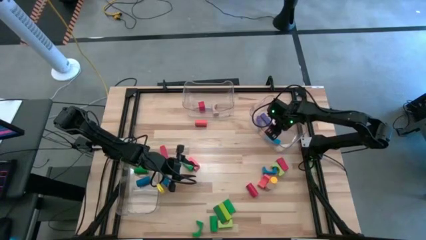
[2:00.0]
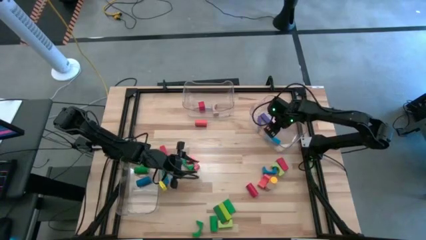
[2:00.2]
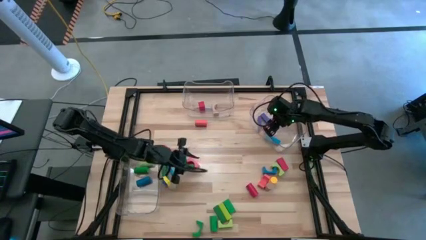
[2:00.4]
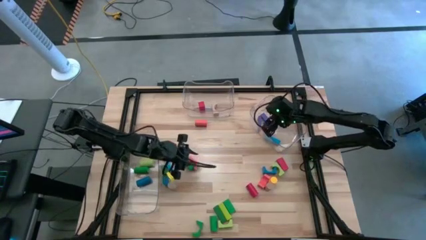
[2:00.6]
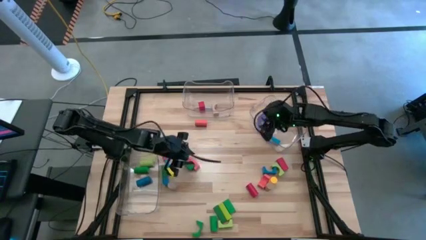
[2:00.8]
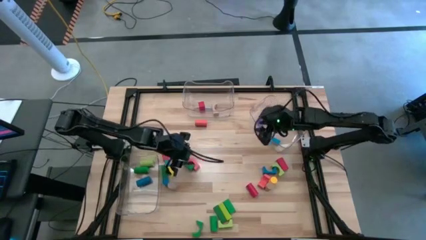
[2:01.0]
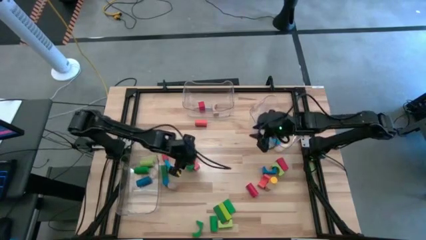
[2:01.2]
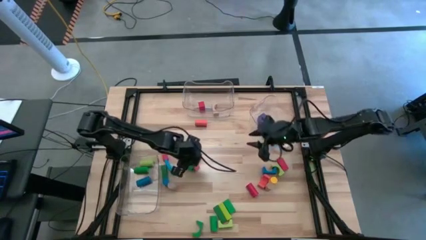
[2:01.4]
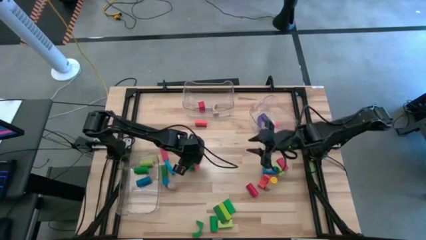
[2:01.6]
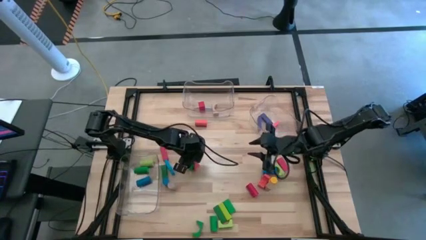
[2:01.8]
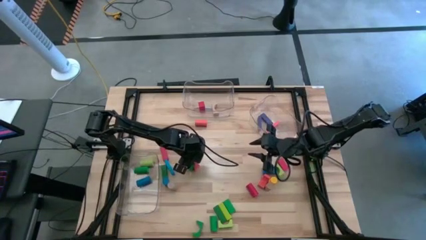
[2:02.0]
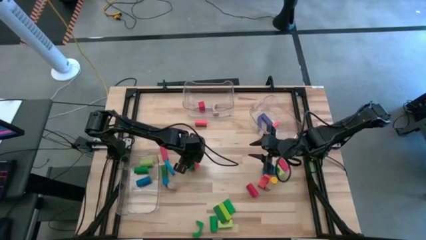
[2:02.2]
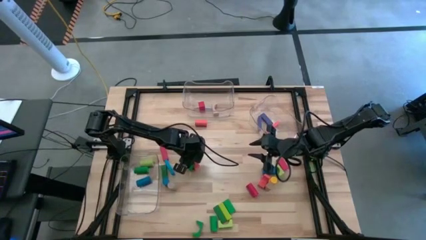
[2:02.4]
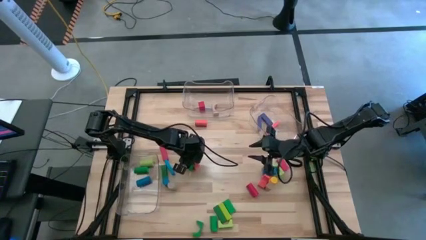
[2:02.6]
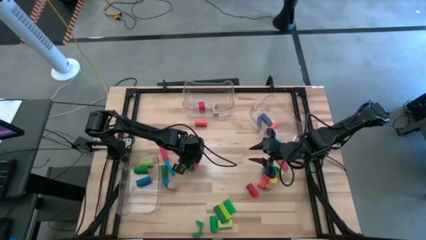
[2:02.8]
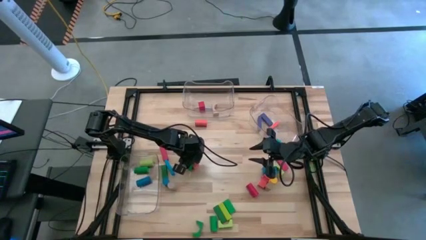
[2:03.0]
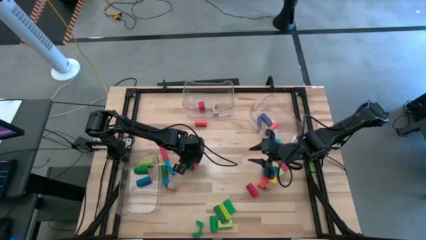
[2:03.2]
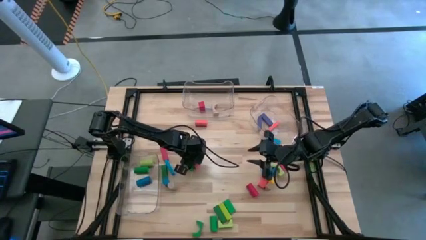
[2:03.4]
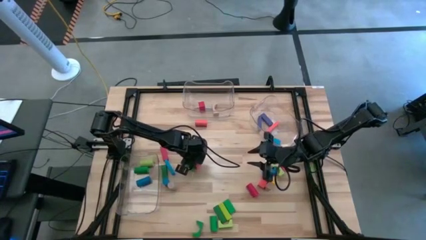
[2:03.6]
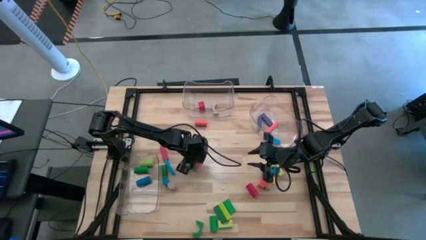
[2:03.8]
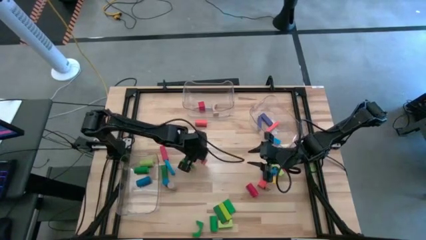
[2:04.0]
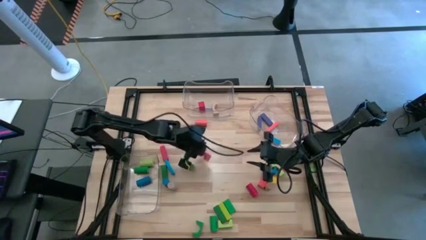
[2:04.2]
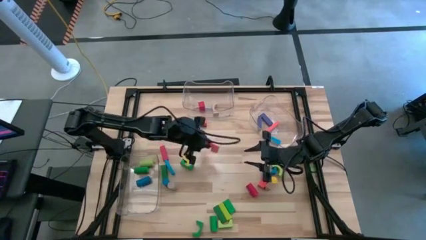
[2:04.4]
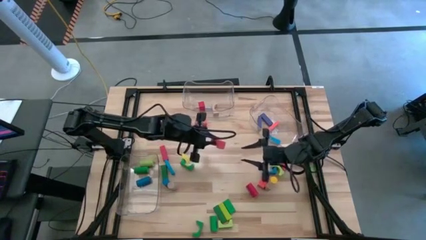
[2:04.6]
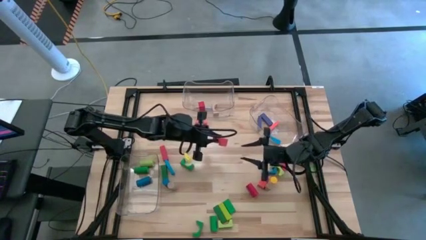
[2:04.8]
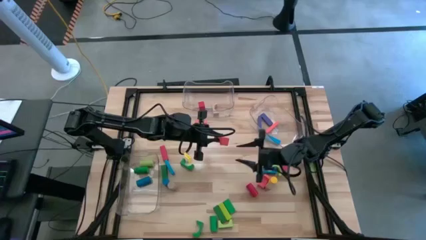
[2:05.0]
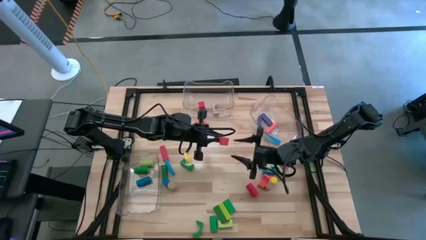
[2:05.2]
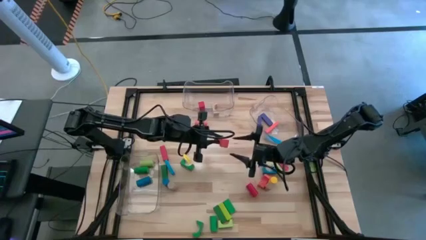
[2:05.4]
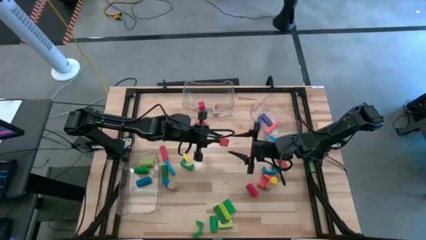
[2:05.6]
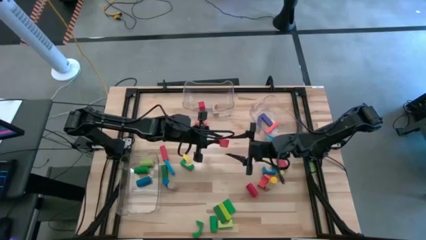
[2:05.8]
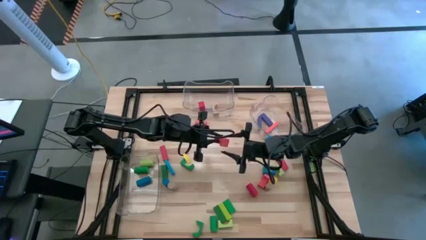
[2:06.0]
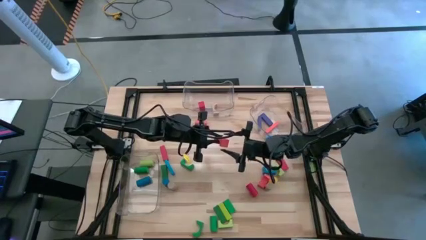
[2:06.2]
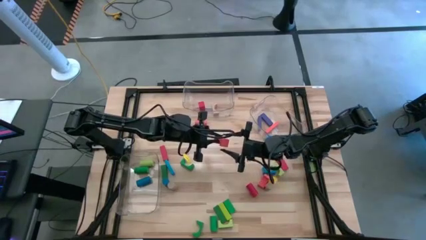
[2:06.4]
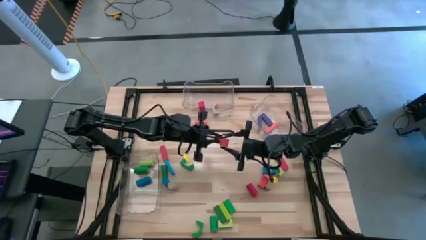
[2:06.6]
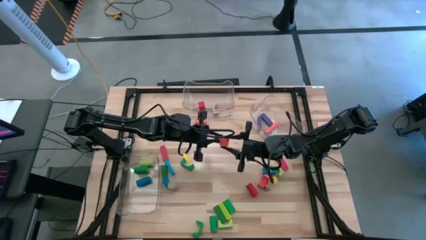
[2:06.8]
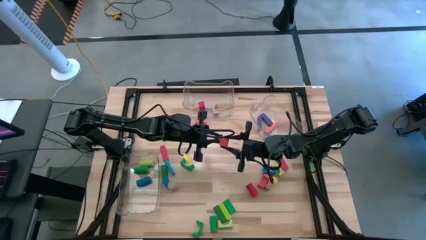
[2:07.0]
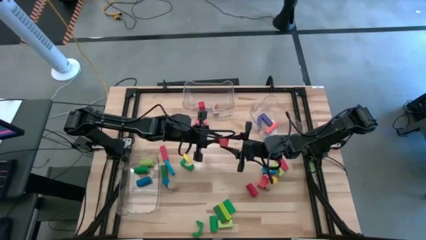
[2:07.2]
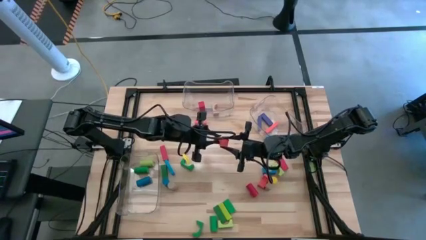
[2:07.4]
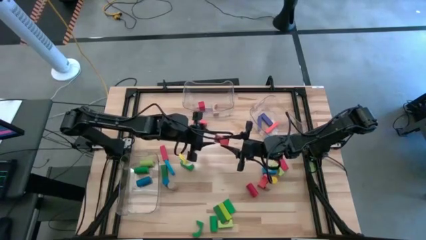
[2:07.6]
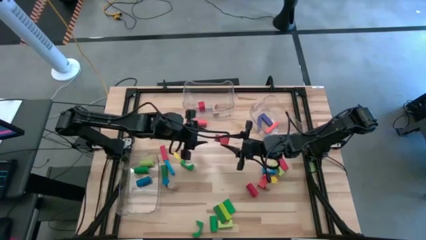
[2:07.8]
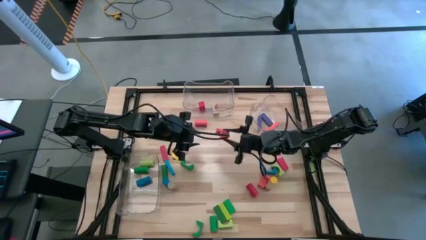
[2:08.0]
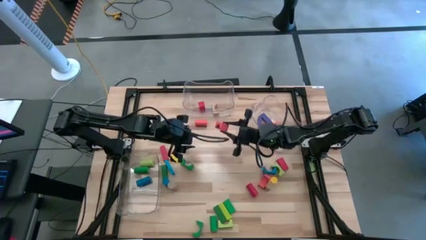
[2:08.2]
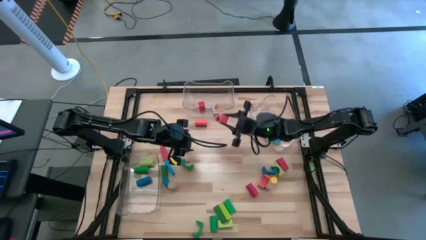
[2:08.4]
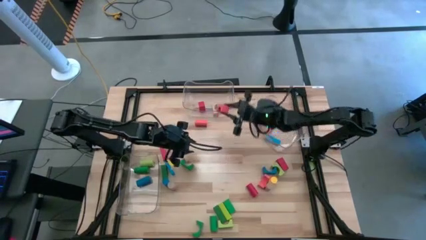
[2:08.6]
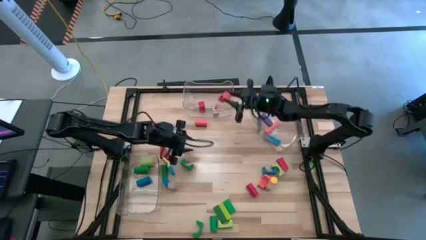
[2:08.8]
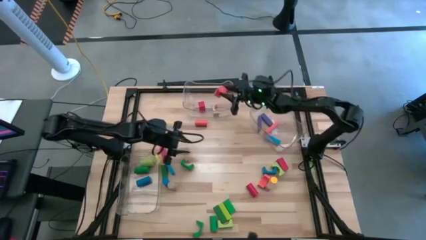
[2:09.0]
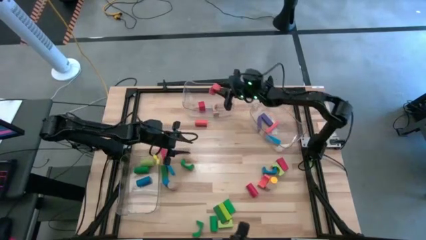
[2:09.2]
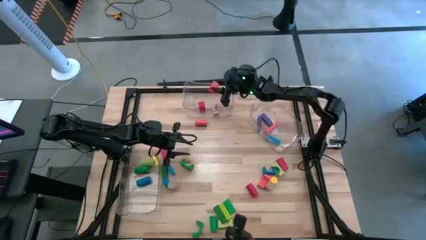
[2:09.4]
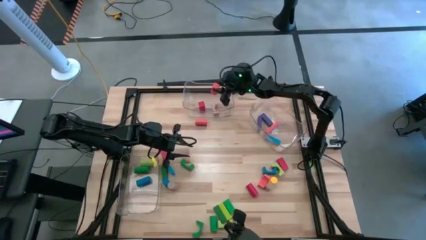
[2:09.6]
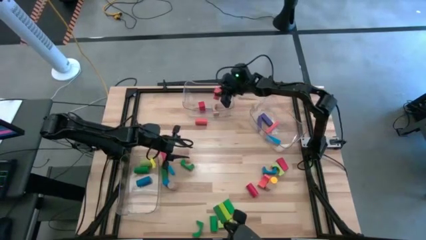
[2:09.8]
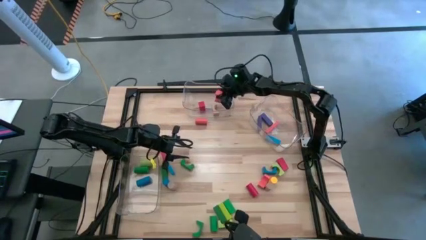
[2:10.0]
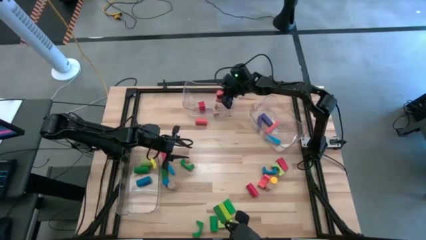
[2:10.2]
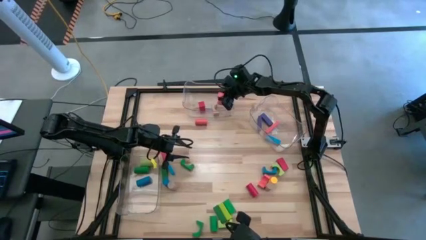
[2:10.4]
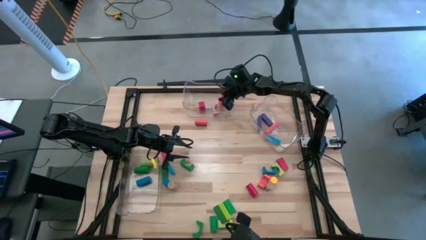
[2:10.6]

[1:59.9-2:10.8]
Task: Sort blocks by size
Put the orange arch block into the middle transparent bin
